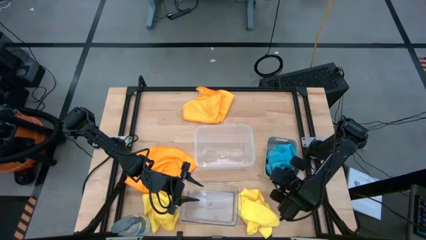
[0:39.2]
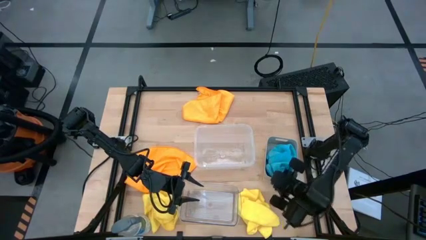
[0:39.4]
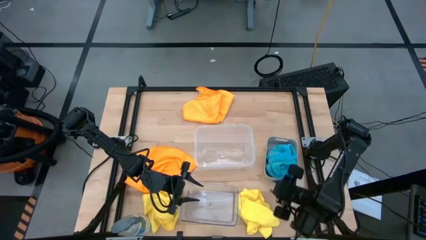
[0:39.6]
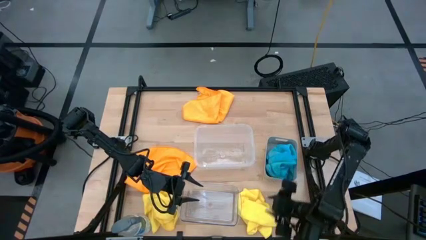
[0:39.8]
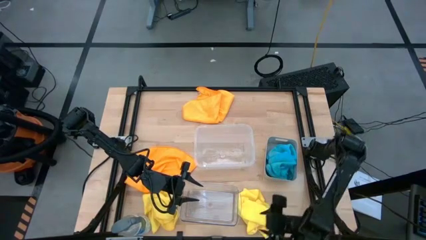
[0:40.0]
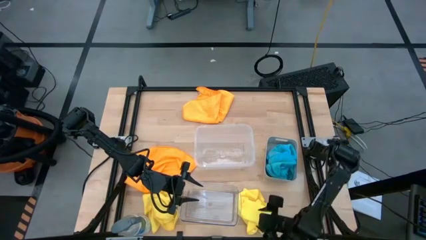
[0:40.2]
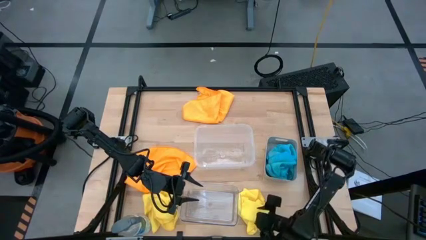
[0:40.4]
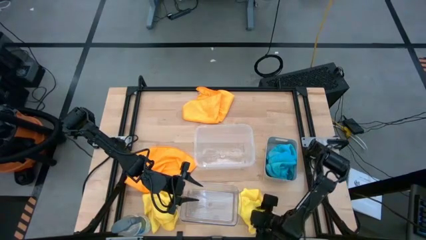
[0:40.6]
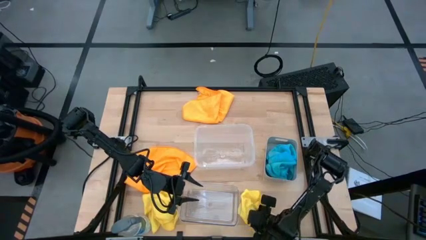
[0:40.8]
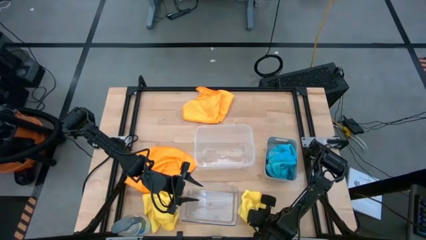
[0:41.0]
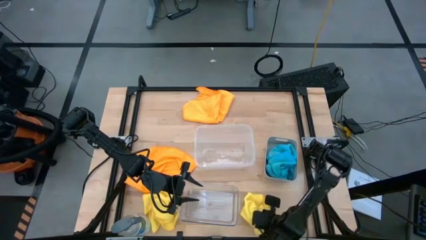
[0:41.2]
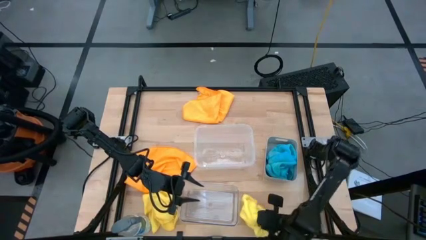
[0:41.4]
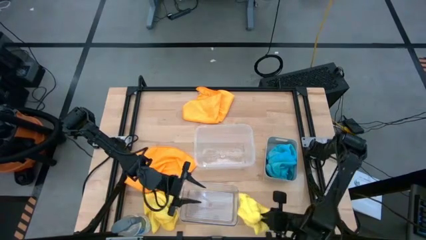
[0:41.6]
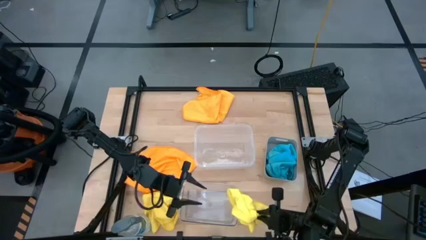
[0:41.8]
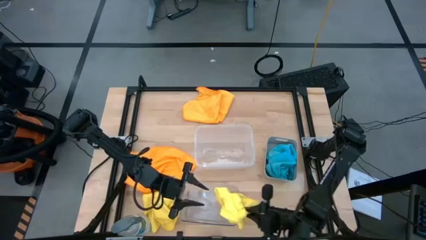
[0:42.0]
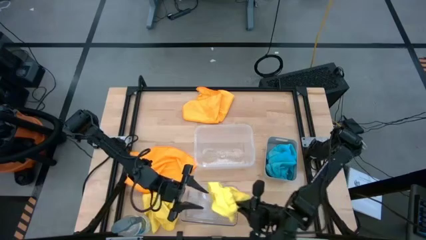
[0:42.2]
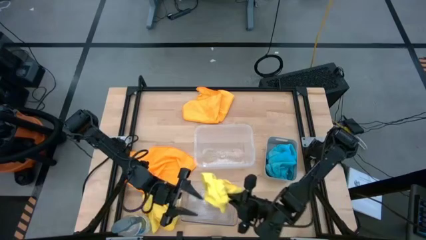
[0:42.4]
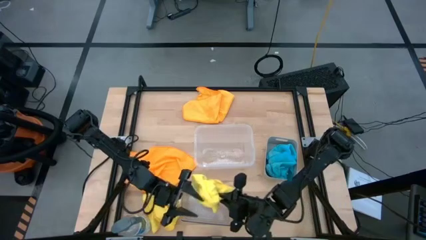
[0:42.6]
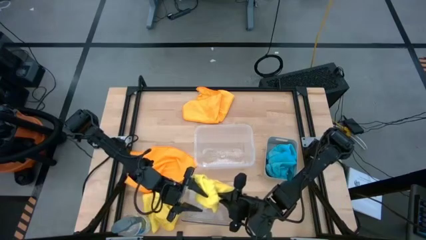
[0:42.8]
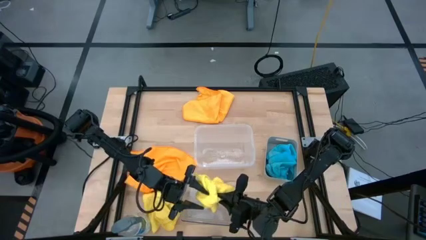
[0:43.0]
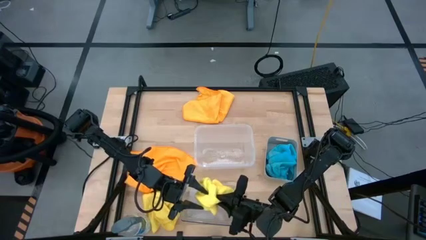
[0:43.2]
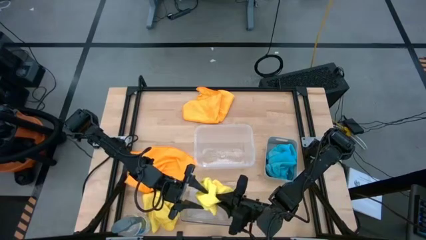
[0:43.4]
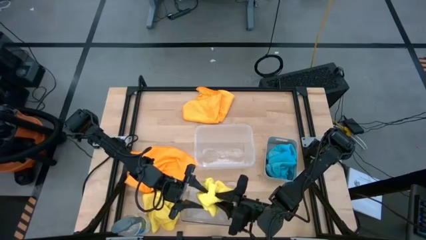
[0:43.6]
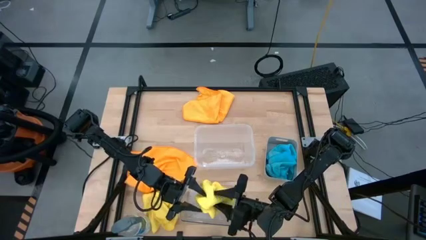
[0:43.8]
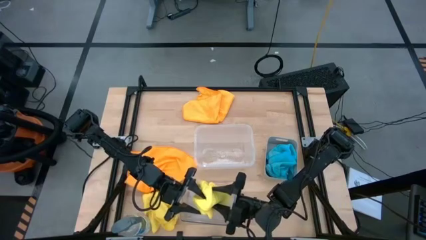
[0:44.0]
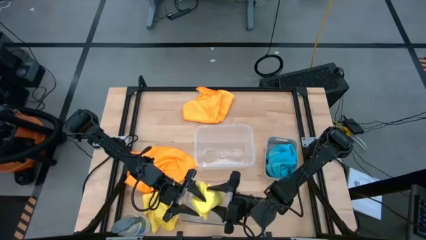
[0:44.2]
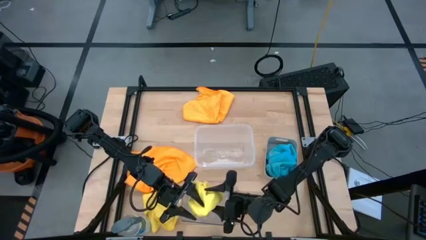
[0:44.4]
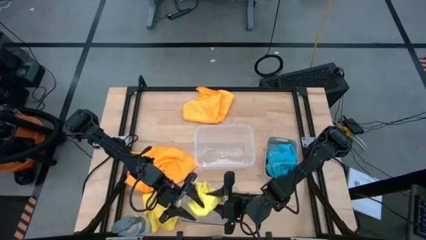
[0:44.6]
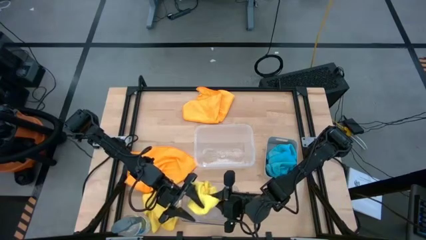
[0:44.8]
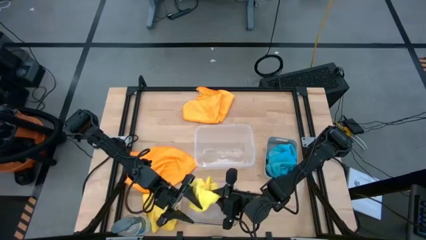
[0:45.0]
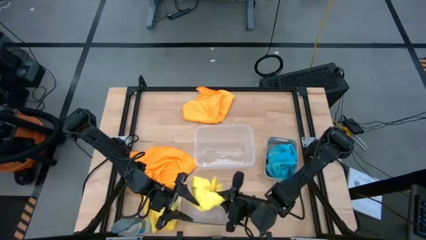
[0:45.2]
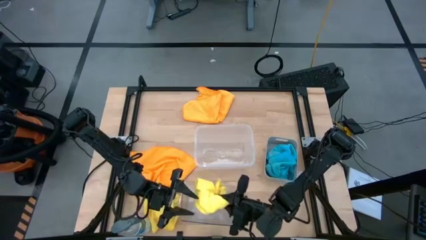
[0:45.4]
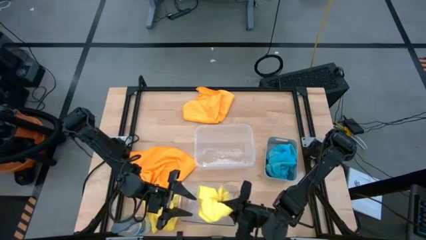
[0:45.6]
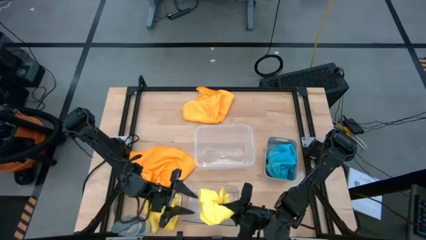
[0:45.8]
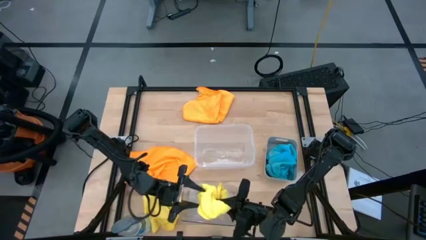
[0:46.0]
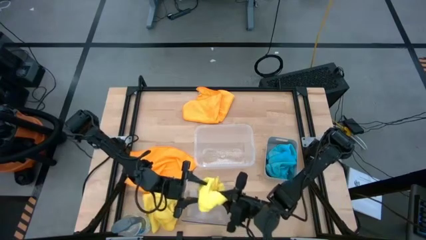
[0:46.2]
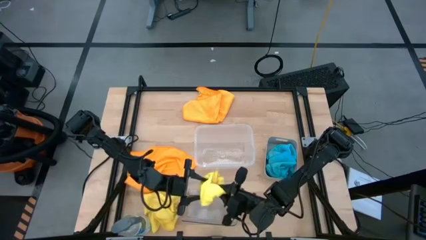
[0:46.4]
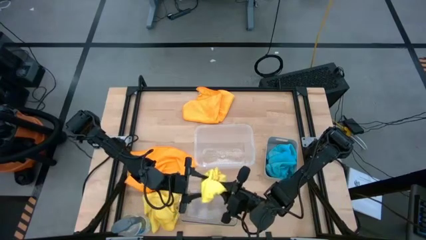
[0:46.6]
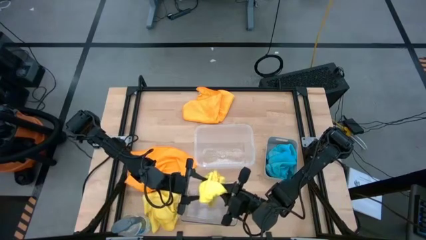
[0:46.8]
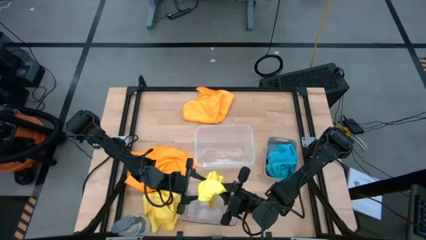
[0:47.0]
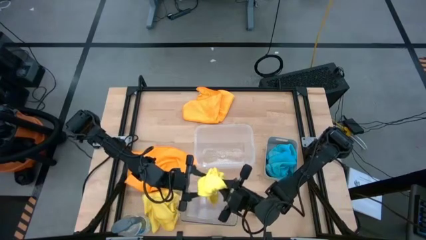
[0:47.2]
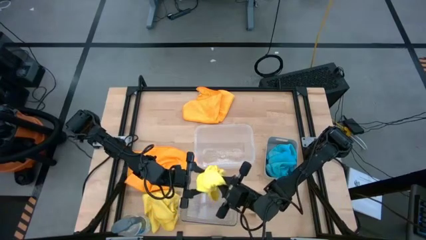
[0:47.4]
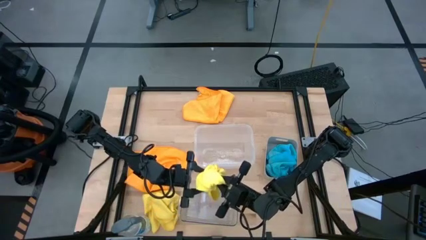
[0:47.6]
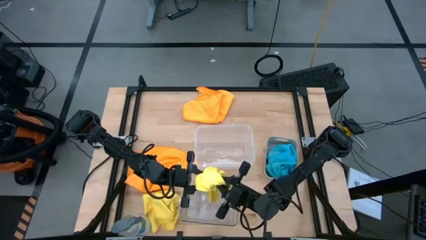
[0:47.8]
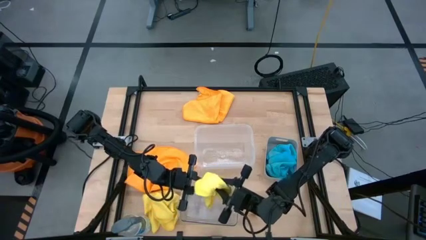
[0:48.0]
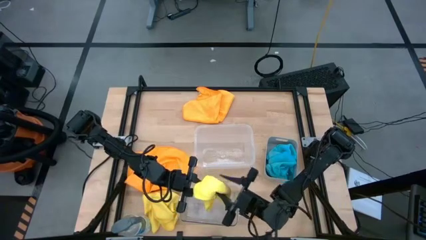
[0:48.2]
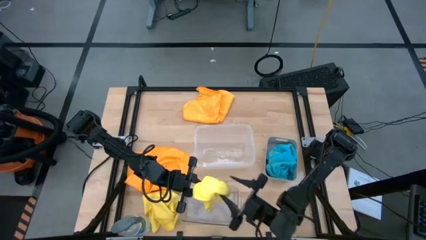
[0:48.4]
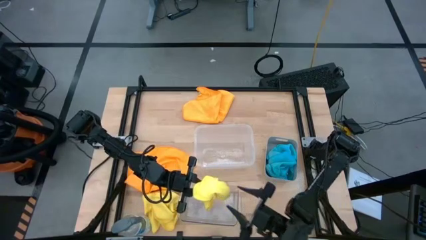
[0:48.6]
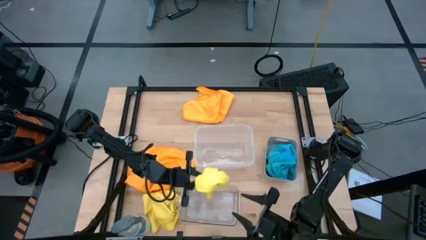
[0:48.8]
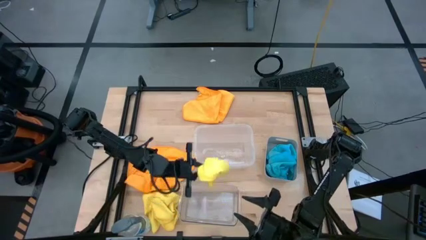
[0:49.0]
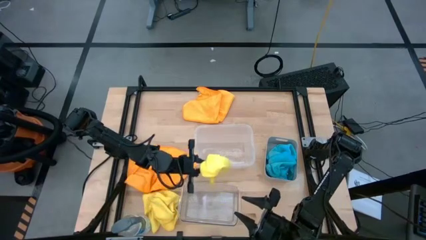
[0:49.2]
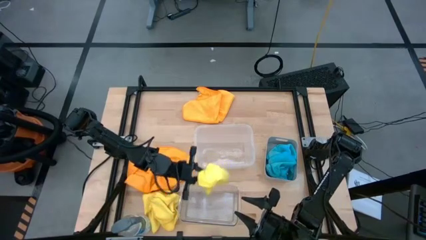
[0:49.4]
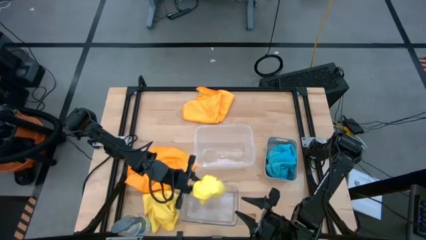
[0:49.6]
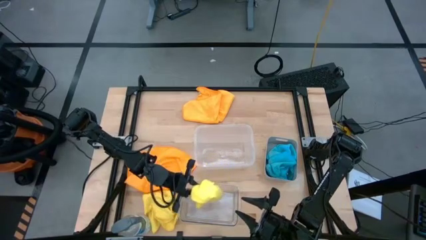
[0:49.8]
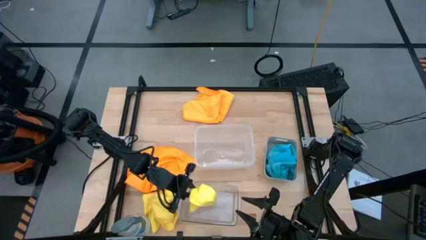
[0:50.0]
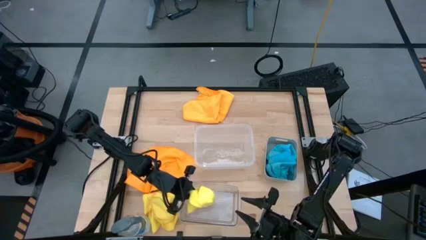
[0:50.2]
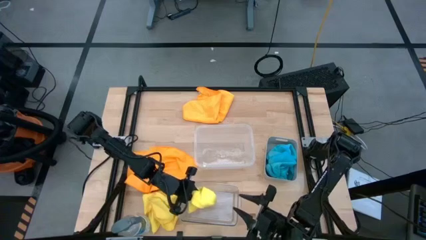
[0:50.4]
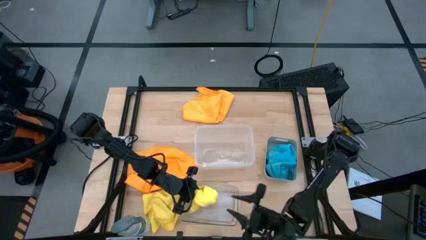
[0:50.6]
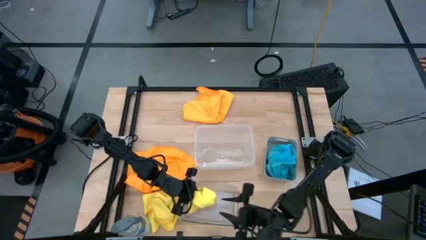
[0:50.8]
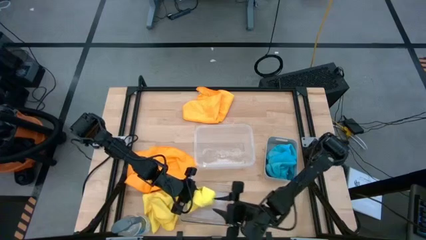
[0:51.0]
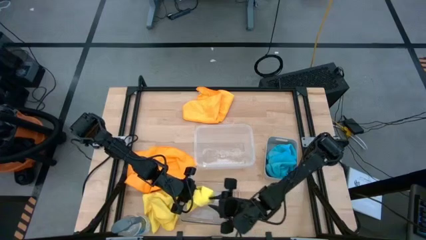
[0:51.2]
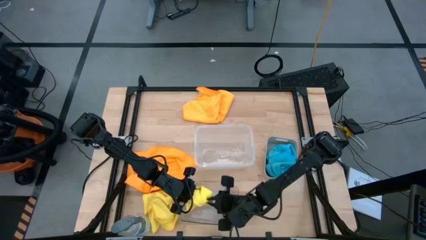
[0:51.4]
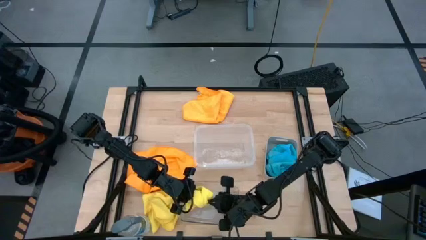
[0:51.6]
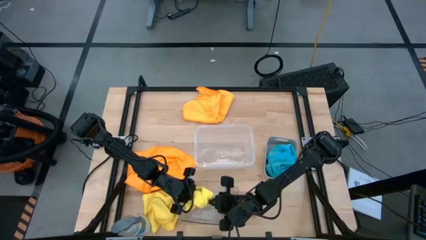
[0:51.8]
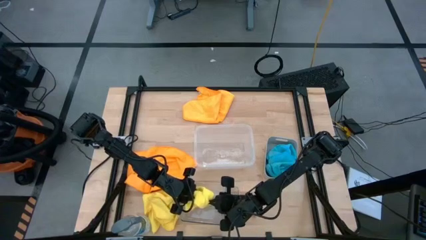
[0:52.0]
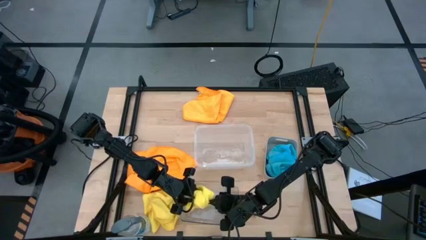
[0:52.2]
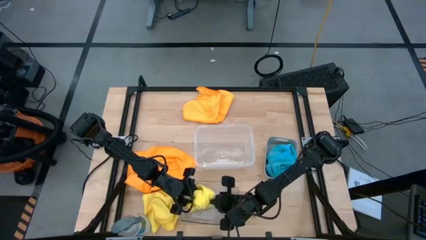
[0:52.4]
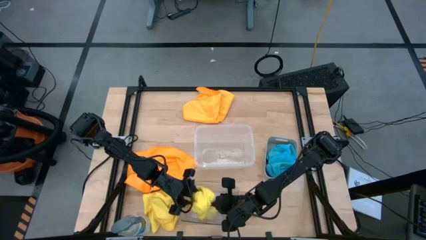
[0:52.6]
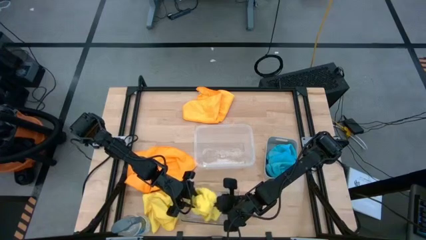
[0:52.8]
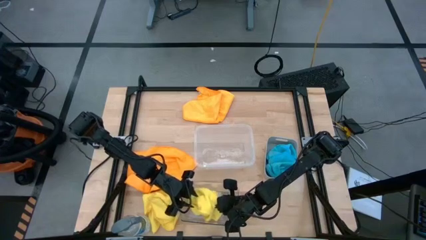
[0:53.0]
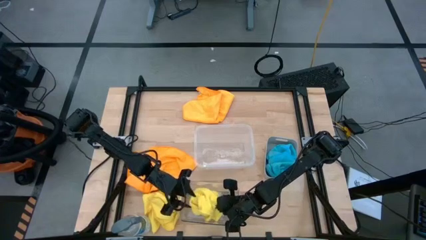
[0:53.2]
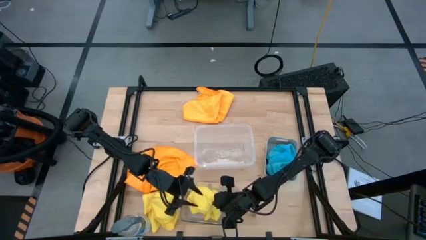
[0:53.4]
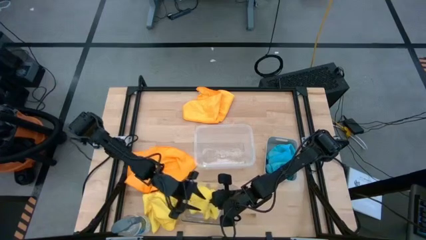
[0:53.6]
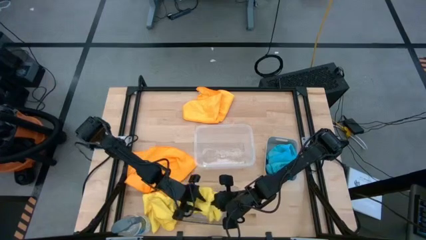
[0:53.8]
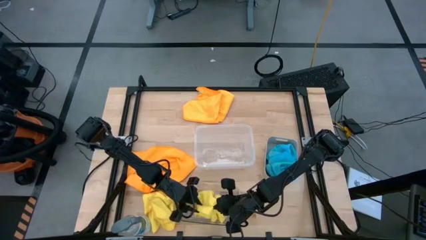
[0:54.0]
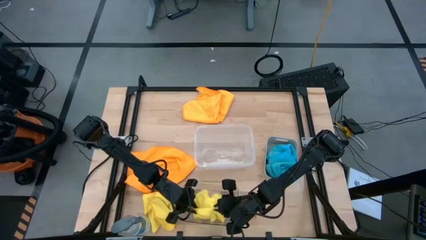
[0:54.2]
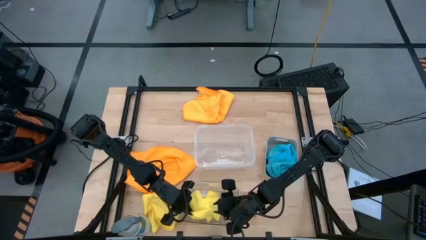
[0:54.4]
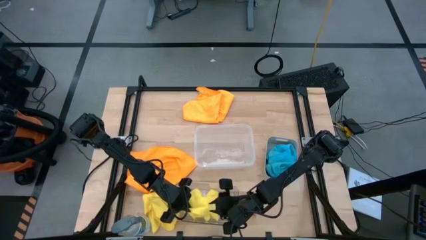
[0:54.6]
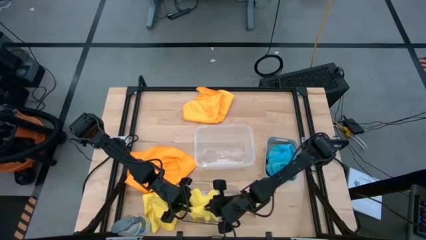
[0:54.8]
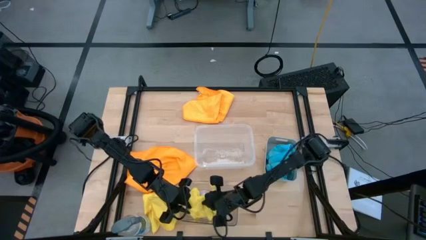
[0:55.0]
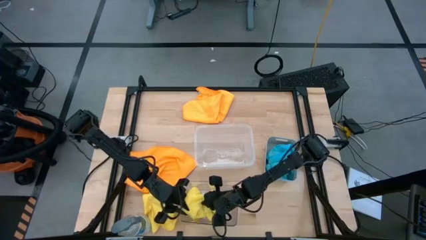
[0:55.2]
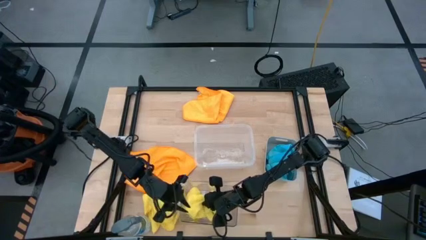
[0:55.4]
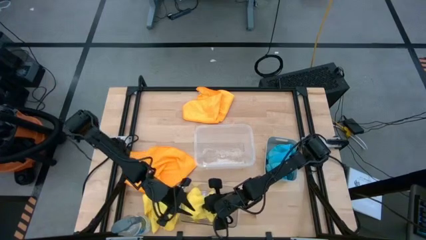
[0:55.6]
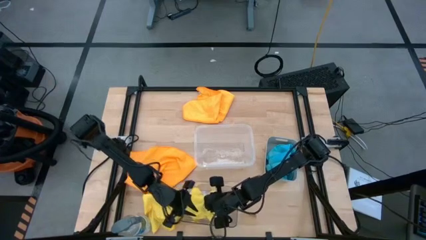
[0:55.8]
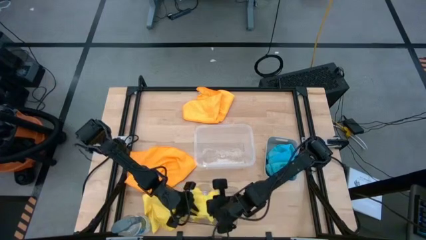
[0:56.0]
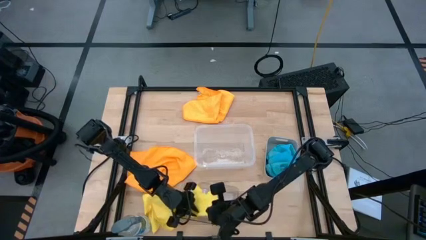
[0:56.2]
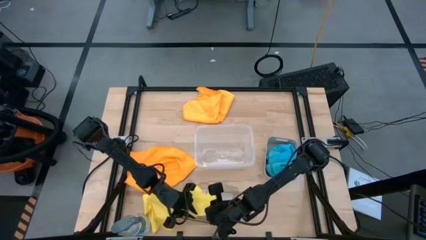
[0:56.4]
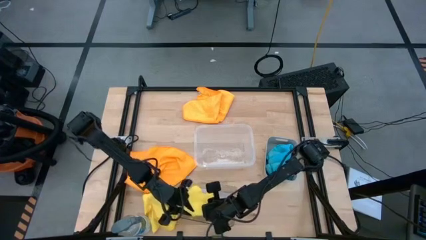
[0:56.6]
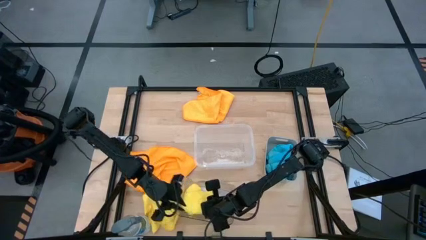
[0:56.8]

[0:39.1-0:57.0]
Task: Sort microfiber towel by color & place in baskets
Put the right yellow microfiber cloth into the transparent bin
